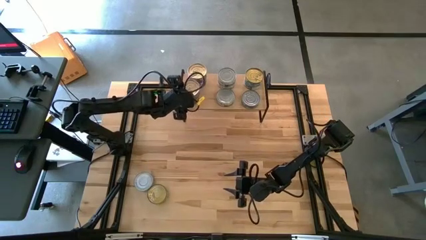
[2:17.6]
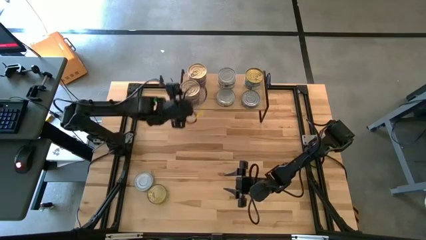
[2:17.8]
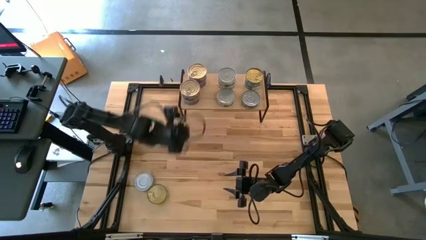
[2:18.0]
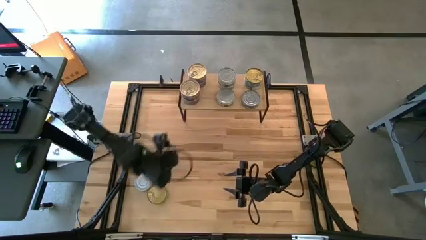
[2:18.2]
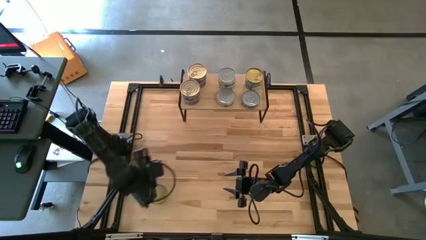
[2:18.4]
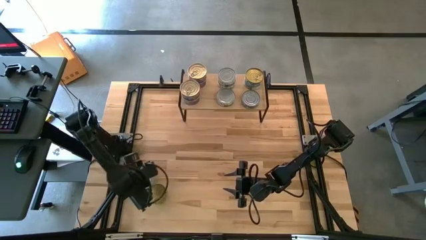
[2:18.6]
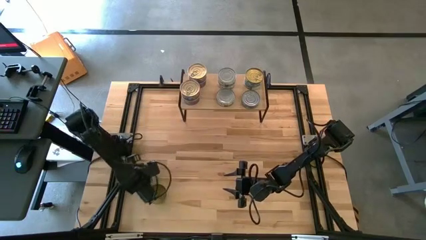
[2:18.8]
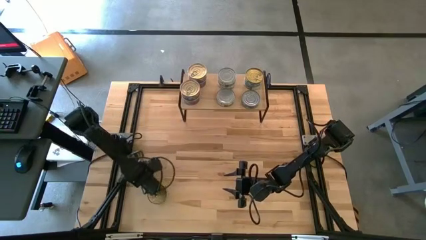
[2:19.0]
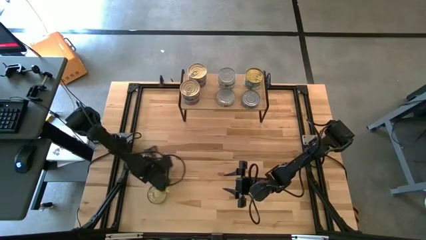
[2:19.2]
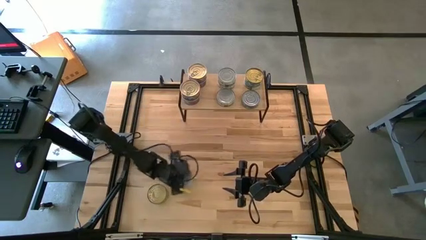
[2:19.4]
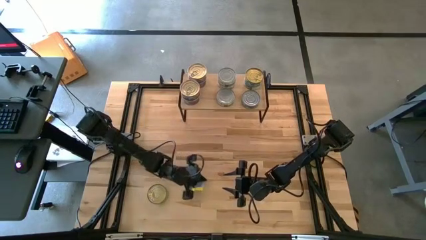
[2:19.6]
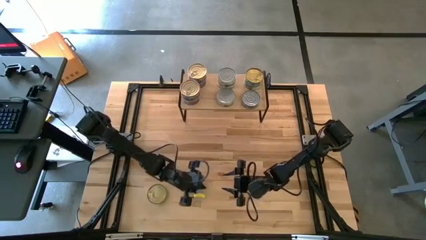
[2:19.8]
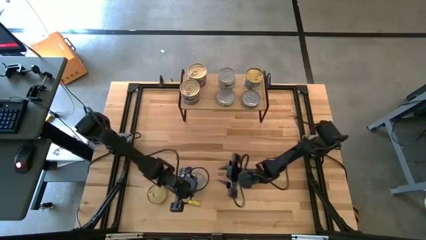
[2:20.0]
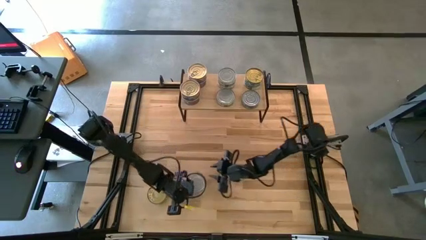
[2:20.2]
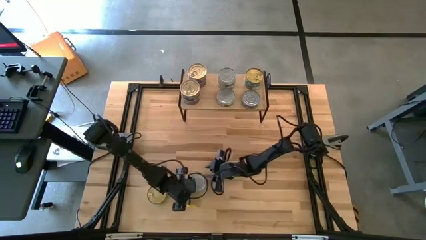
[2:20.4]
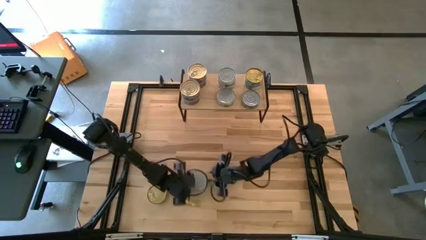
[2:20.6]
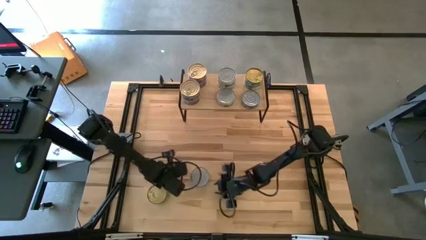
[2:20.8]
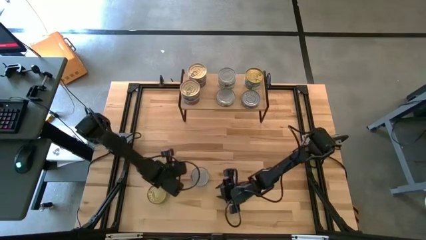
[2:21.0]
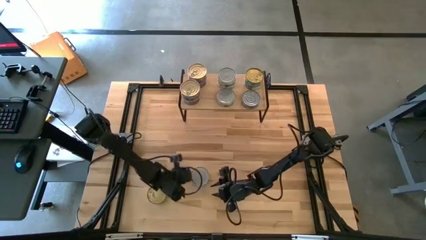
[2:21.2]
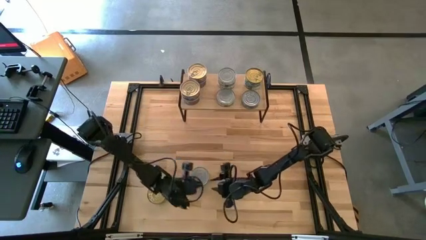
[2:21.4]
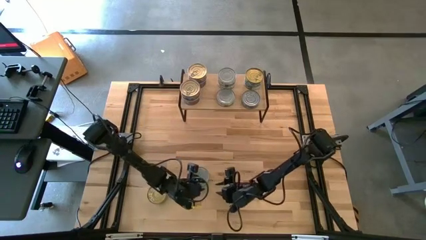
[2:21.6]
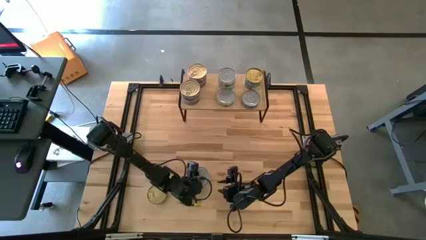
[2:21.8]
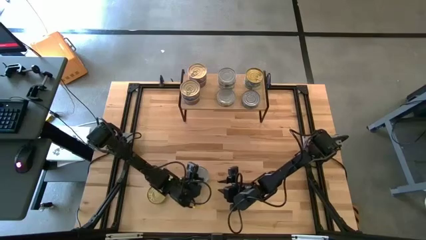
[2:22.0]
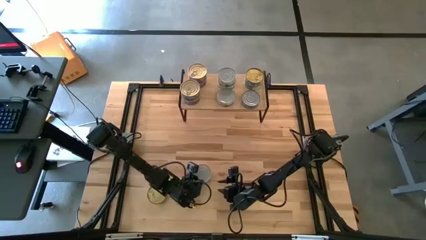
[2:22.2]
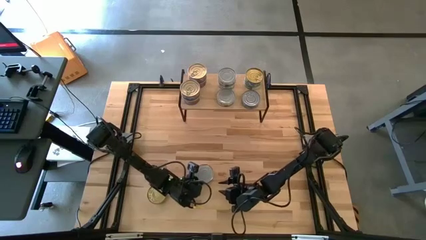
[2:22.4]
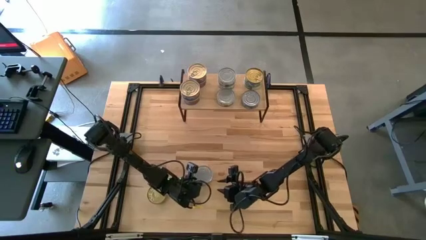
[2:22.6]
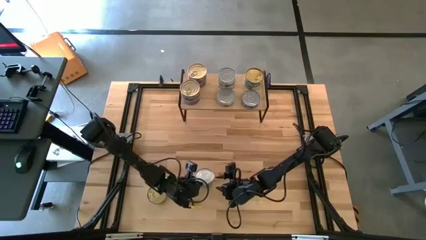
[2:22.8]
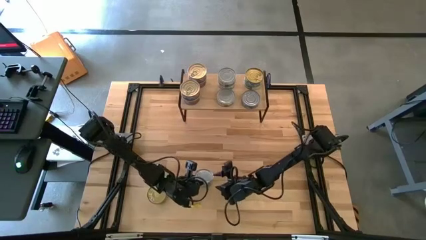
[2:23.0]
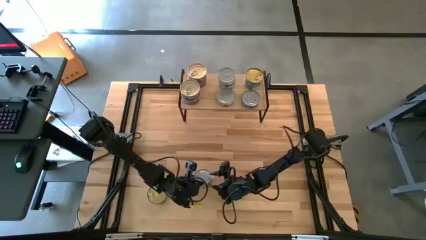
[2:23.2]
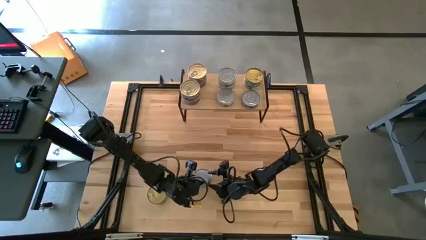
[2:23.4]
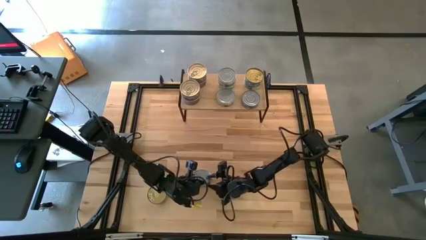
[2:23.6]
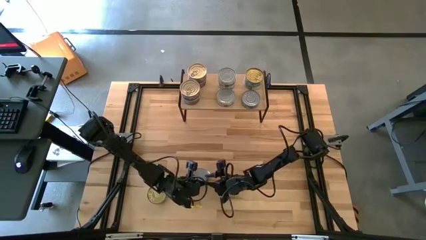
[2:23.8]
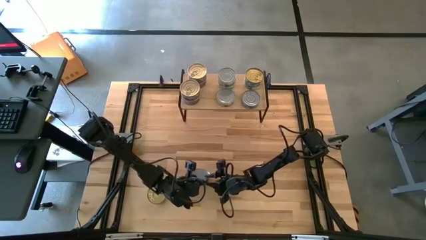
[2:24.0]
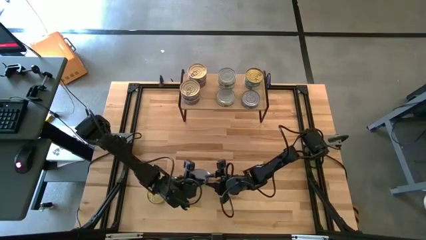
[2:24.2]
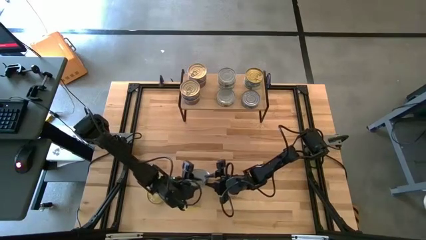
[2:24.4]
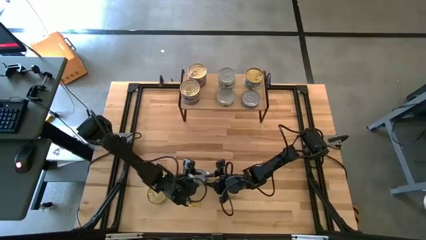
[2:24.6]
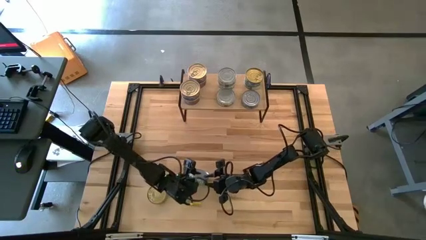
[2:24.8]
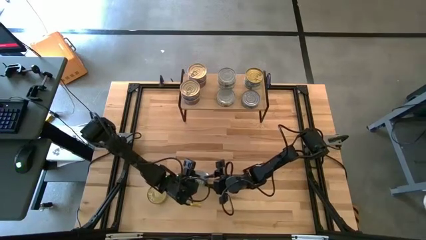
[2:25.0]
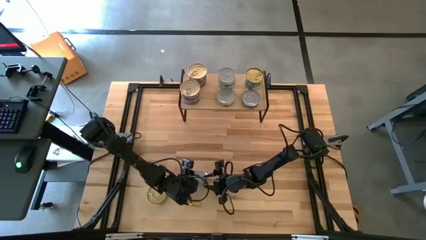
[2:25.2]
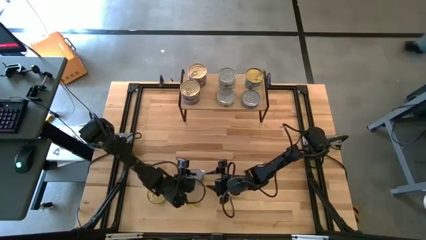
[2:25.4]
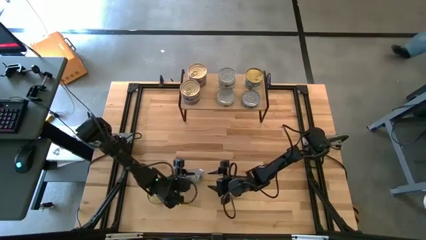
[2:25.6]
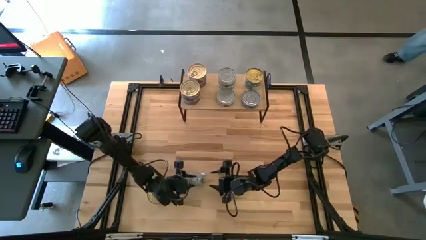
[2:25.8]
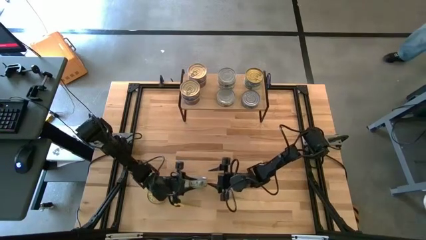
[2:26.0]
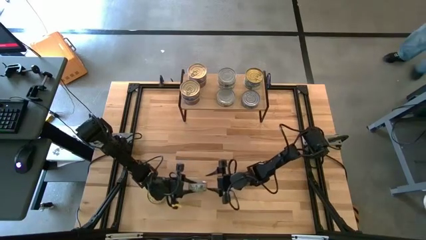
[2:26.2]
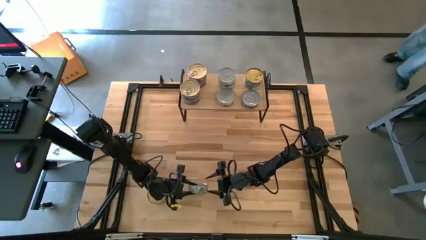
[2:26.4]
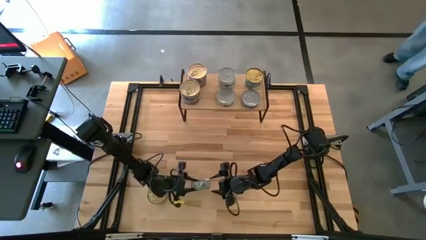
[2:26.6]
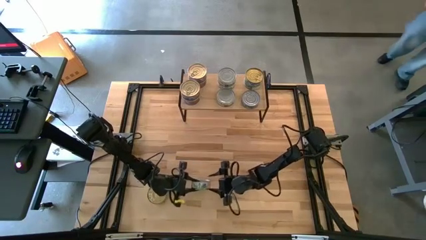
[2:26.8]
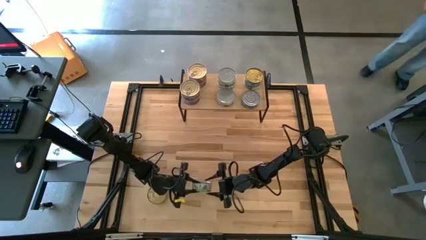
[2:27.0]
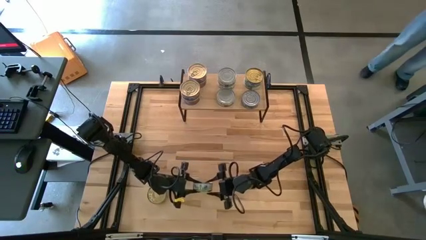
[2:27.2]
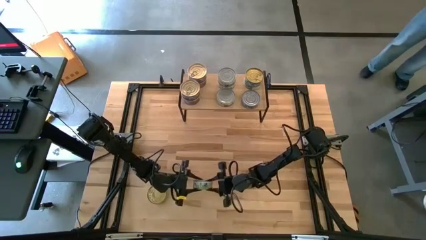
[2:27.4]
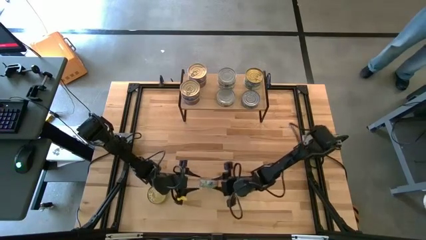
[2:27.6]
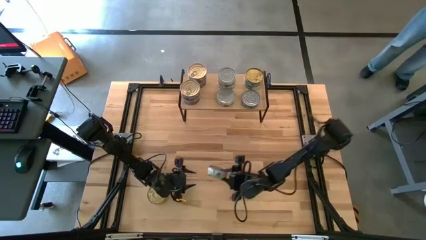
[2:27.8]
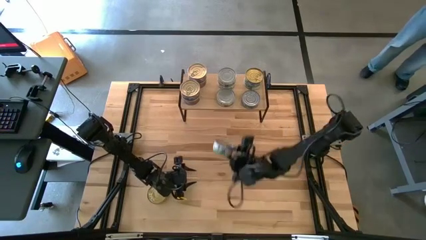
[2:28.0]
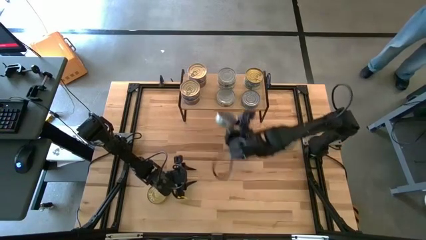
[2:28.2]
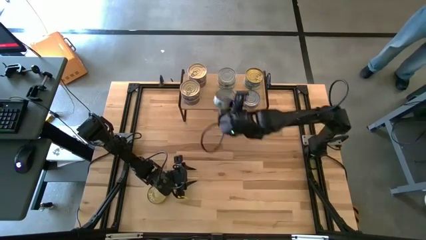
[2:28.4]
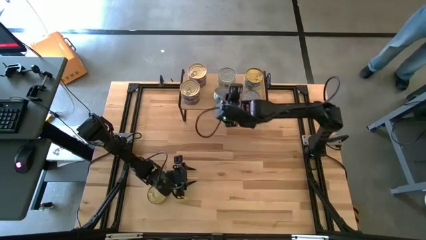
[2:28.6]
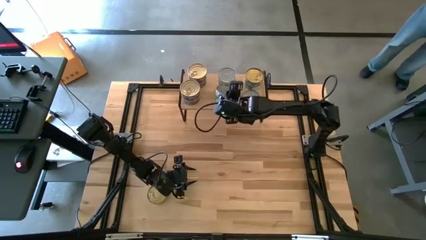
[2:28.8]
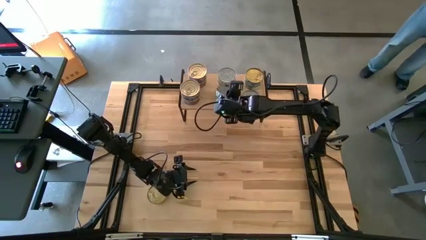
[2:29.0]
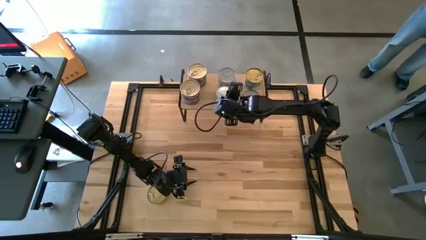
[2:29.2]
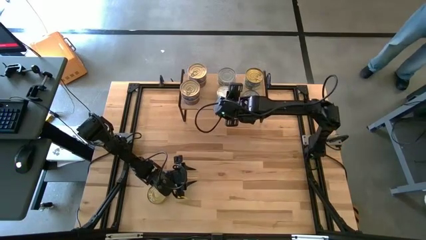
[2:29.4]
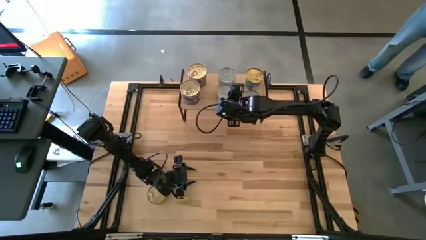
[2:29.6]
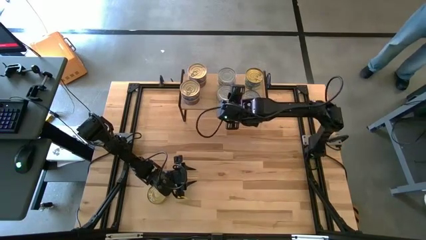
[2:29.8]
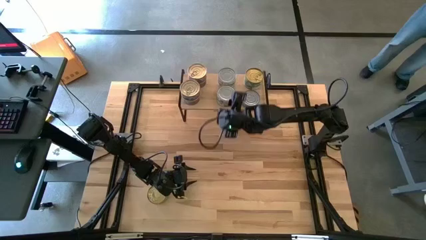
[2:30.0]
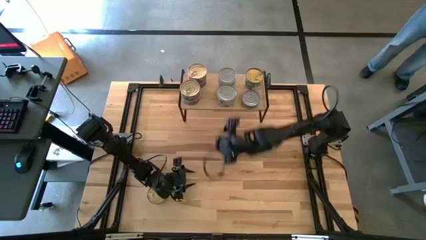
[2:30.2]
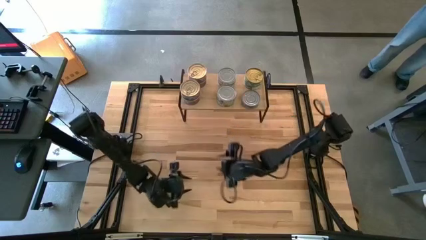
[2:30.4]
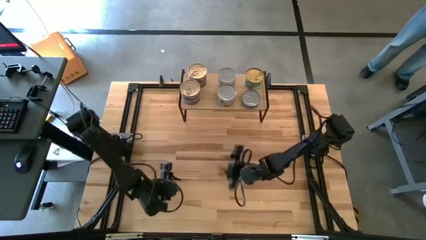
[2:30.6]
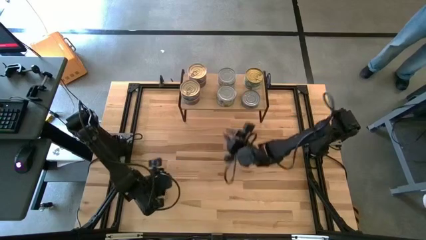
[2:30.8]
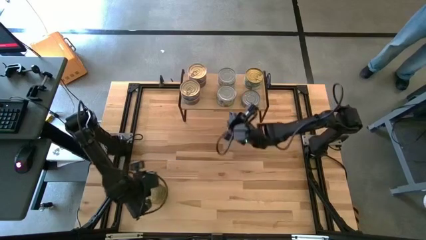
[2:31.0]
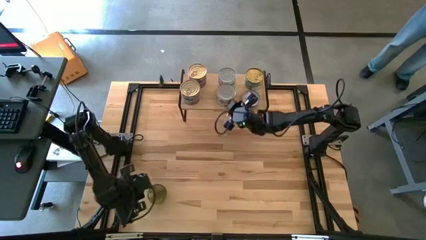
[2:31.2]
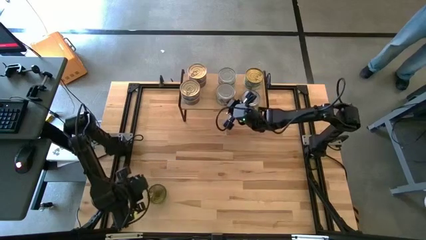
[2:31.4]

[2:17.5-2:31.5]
Task: Stack canned seafood by type on shelf
Stack the green white tuna can on top of the other green white tuna can on the shelf

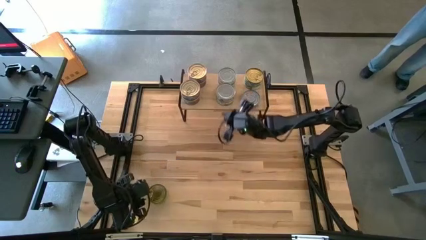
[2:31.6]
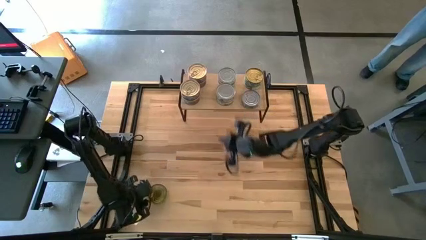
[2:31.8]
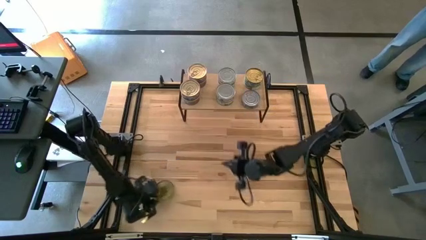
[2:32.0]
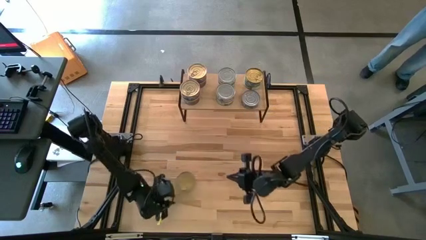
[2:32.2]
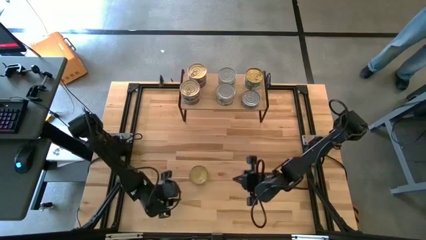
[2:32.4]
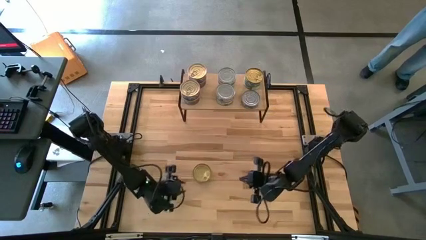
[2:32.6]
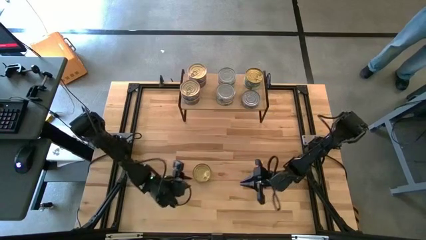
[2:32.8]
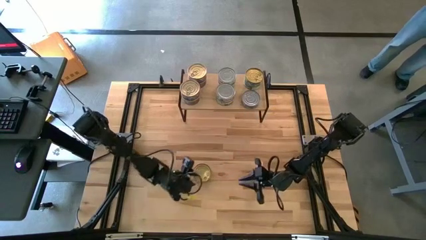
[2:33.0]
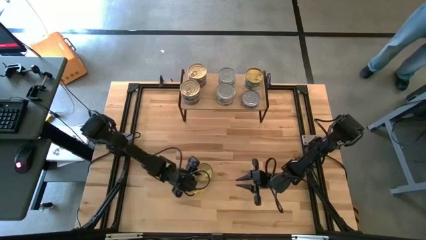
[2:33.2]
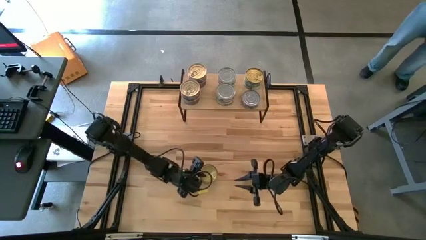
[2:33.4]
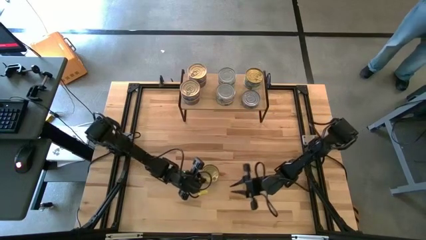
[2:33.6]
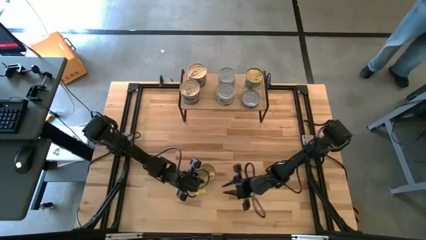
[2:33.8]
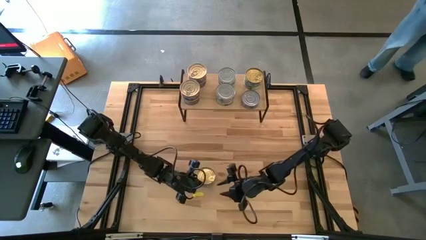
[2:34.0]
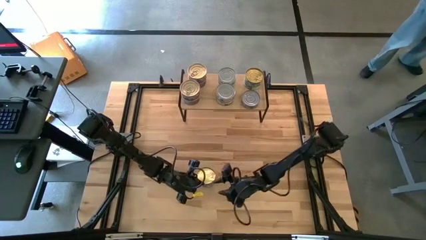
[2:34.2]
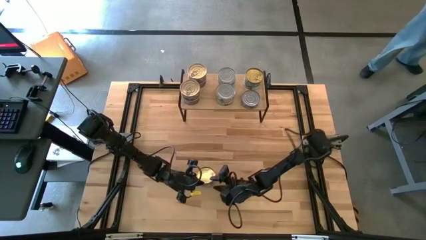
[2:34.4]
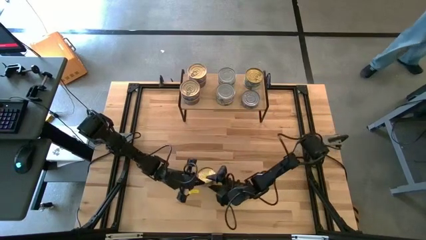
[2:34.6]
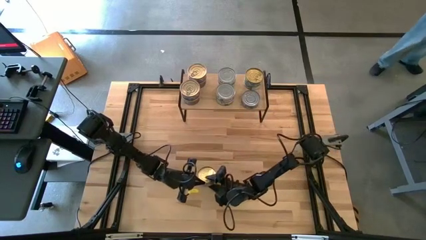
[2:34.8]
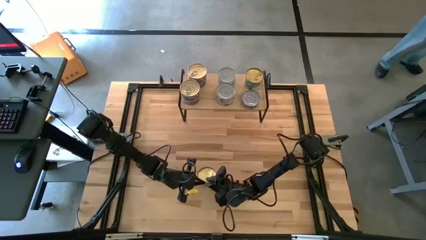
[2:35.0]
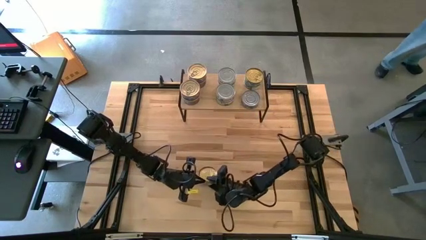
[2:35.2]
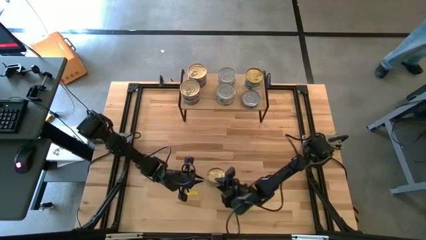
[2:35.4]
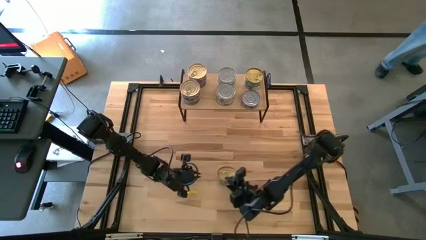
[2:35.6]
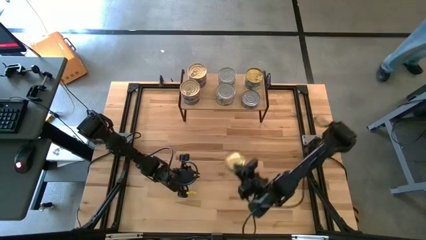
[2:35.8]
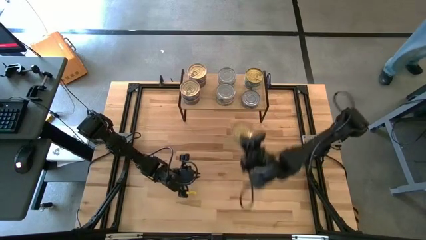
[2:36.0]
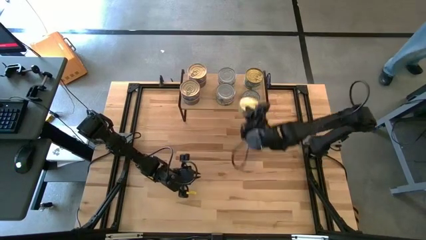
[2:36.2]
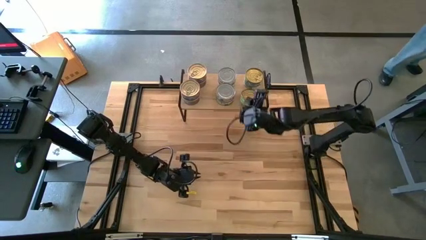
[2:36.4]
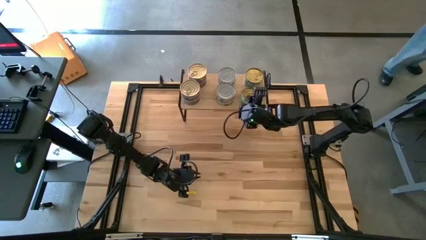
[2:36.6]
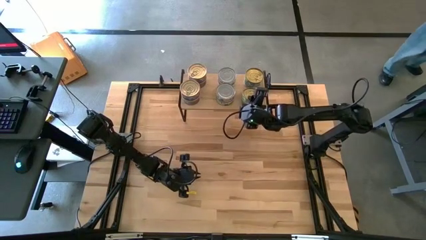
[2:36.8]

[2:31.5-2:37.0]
Stack the green tuna can on top of the other green tuna can on the shelf
